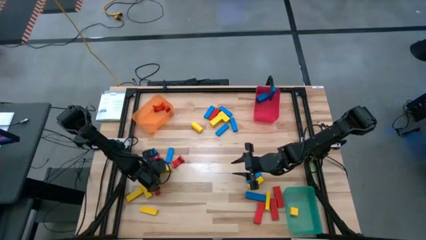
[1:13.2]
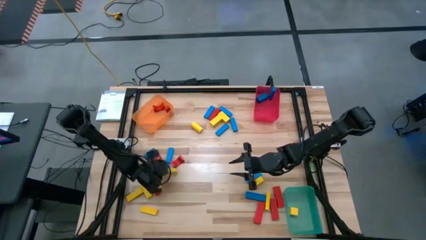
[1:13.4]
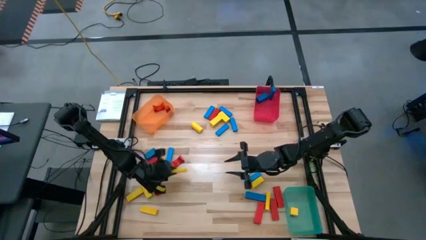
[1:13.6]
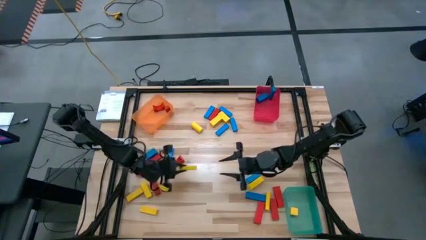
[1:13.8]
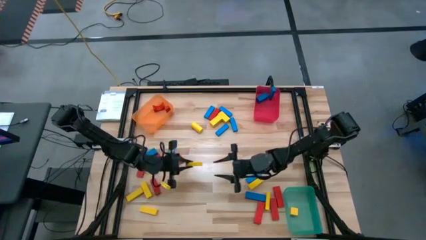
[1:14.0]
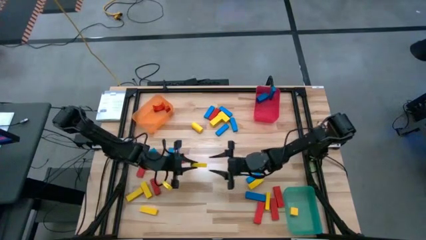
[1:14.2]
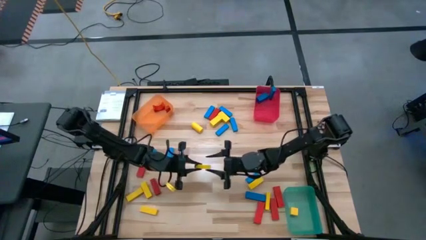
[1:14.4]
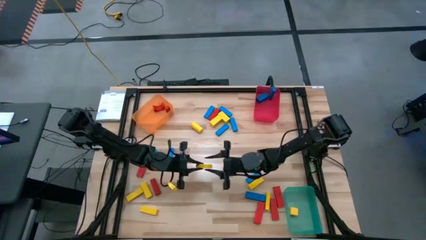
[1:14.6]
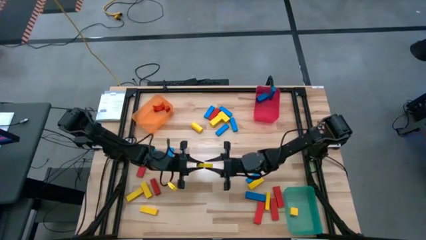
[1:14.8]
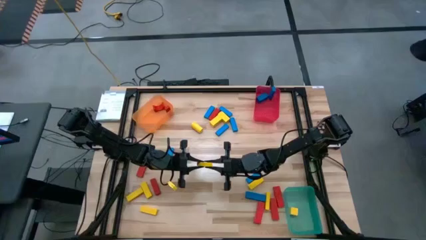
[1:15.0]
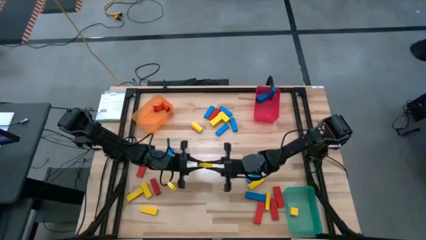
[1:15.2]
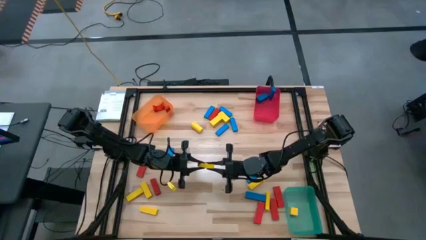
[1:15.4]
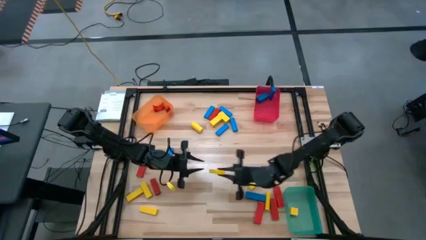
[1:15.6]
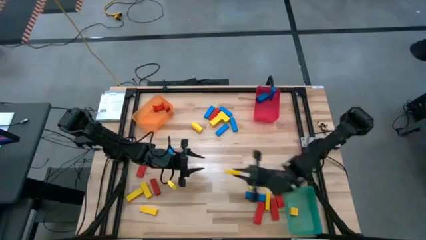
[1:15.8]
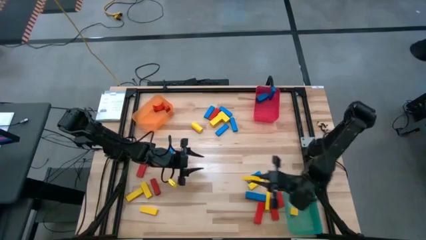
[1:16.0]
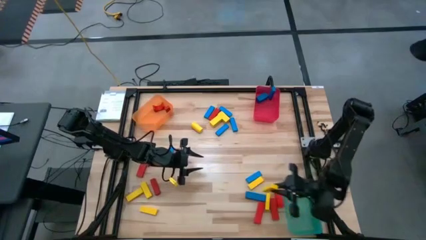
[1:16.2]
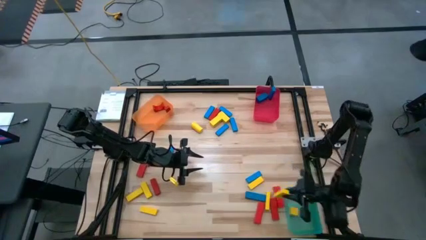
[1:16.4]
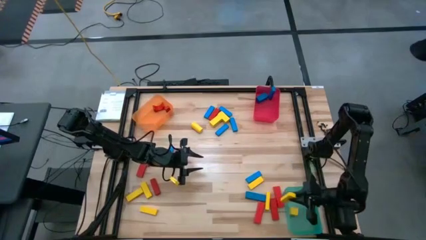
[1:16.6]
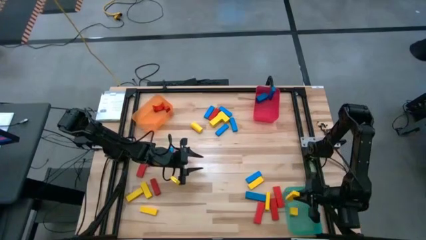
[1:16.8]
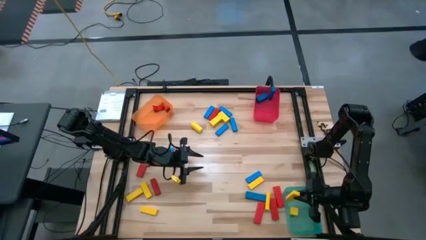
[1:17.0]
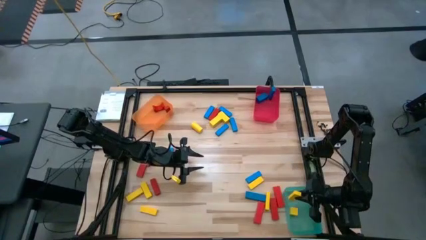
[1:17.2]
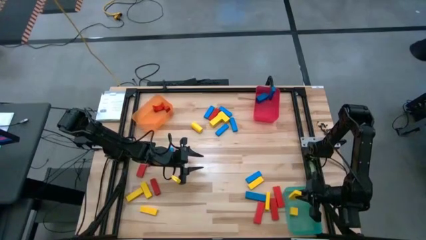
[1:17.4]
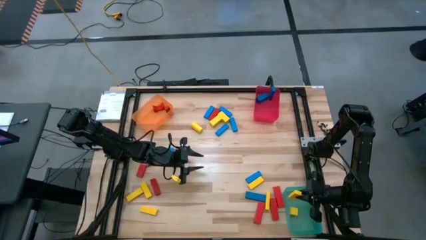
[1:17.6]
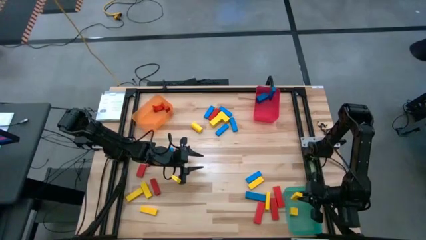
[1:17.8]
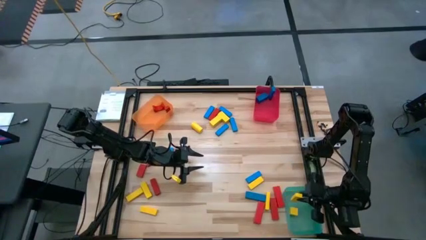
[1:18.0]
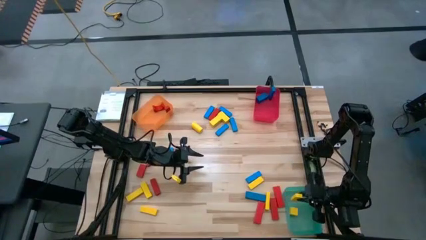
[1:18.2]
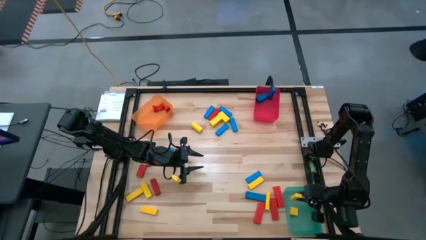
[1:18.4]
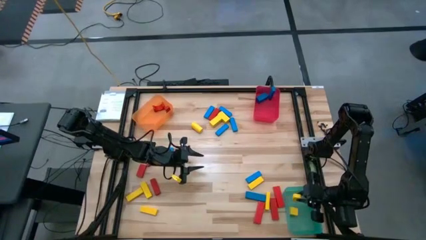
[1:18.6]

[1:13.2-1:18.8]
Task: Sort blocks
Put the yellow block into the green bin

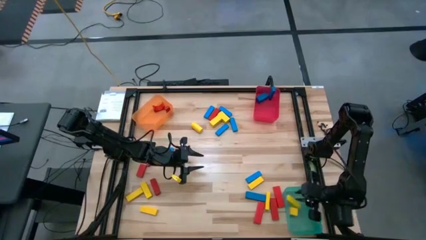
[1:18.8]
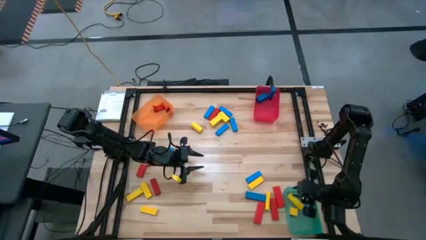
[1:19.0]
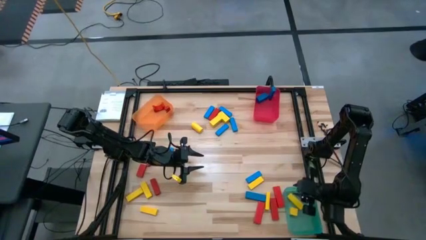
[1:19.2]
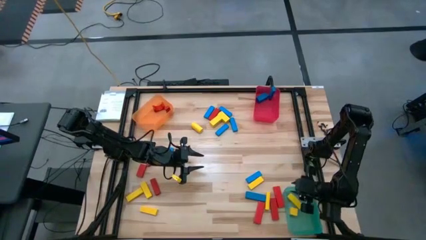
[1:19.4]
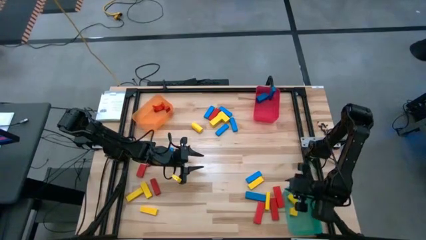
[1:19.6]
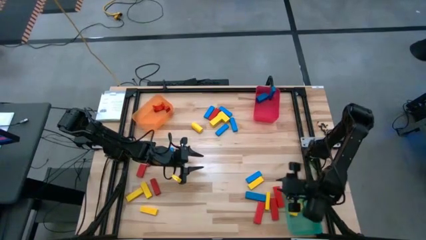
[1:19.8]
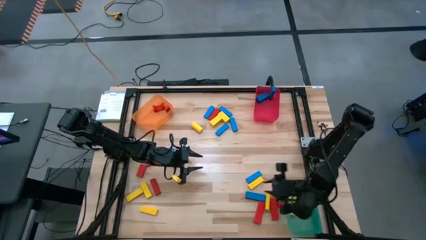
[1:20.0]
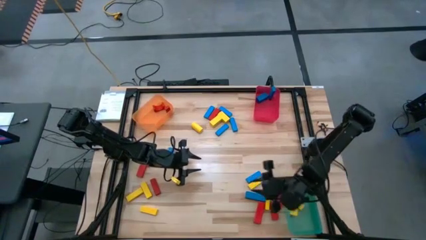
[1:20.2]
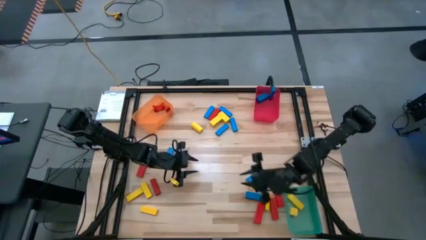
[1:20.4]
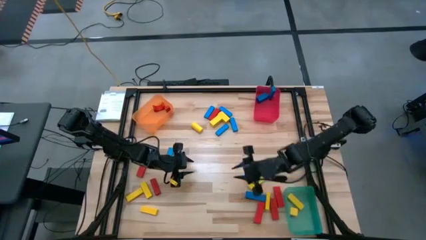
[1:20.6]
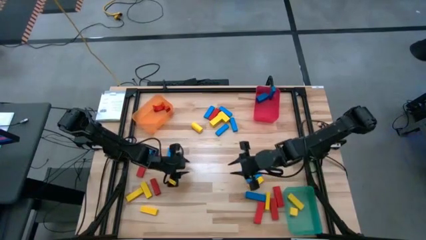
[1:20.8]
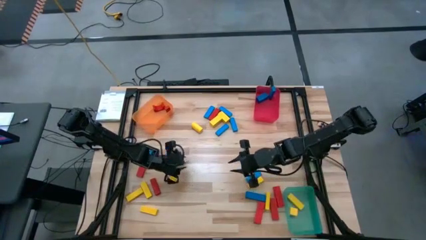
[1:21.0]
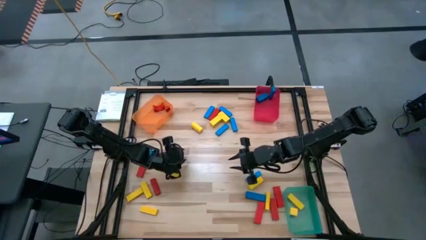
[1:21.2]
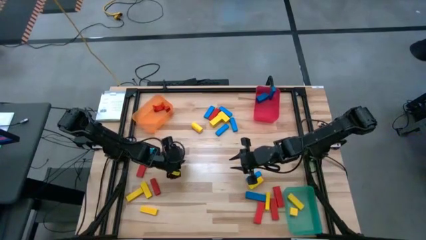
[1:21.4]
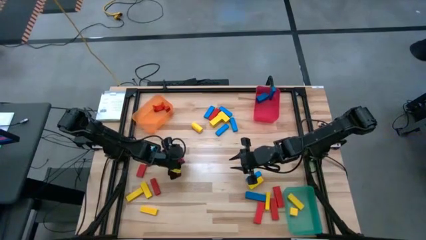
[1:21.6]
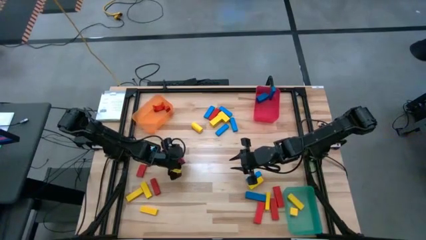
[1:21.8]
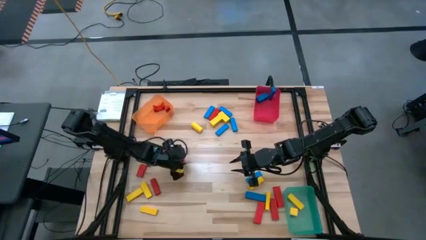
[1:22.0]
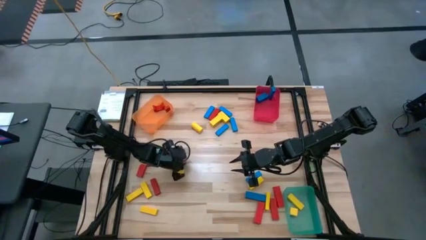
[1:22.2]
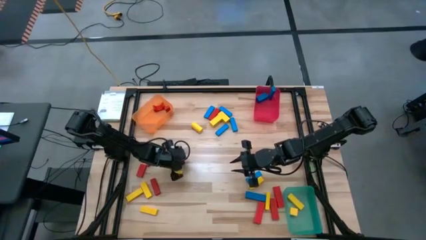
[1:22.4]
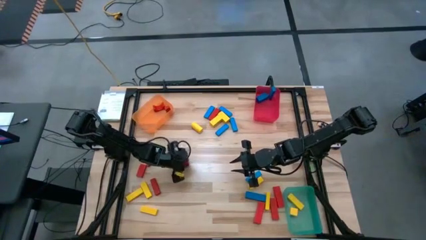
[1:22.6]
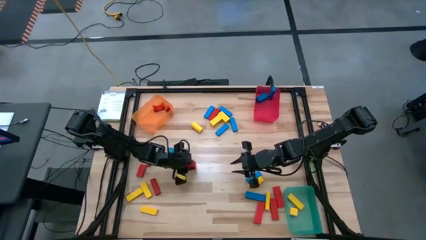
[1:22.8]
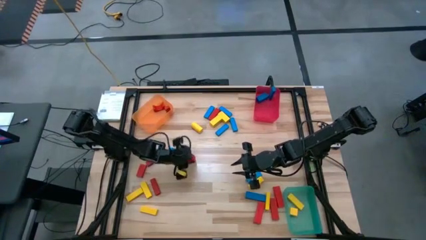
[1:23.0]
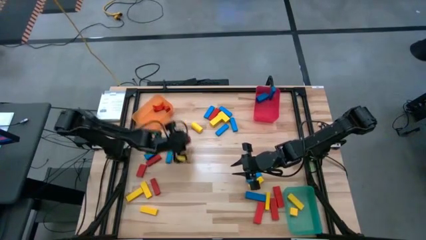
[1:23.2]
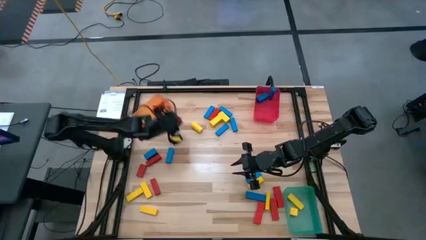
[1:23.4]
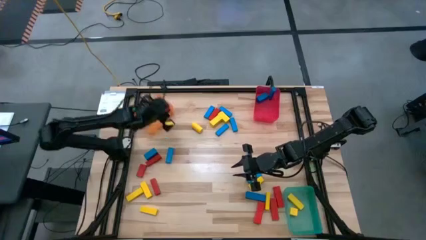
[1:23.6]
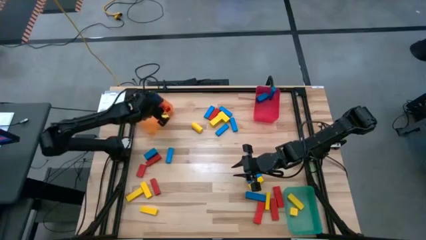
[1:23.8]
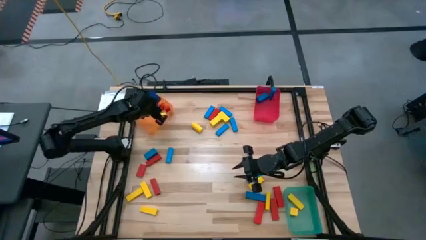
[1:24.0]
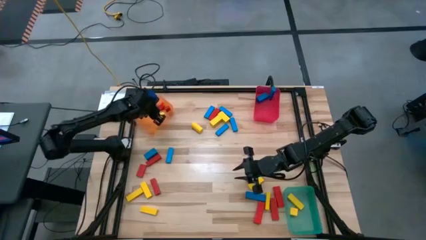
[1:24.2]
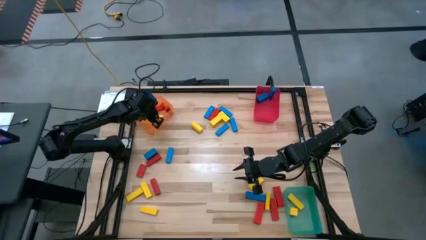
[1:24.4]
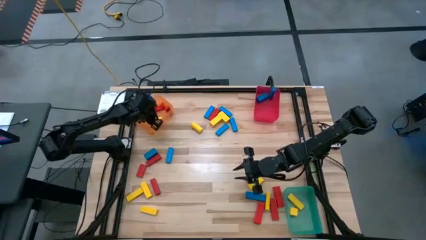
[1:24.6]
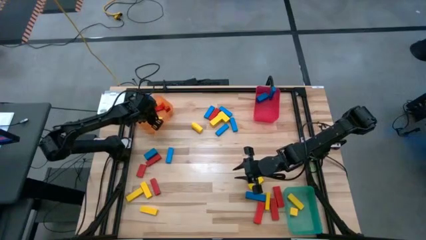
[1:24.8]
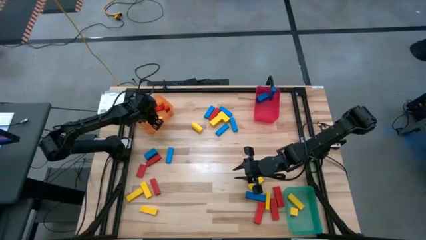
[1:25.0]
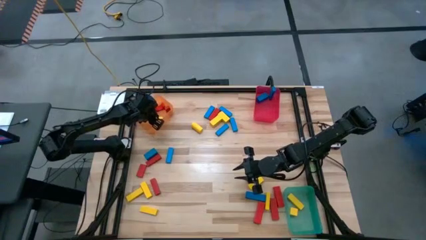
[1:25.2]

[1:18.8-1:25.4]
Put the red block into the orange bin
